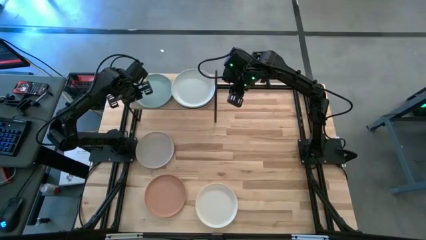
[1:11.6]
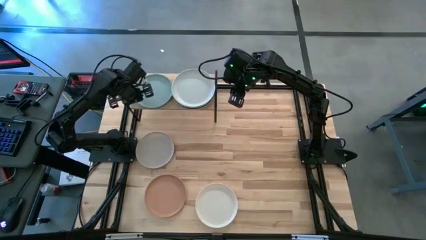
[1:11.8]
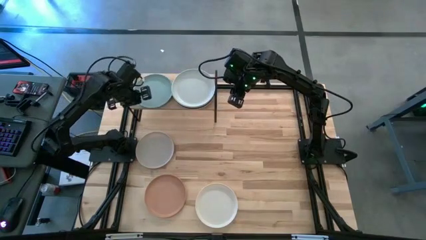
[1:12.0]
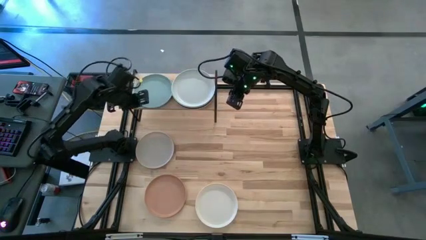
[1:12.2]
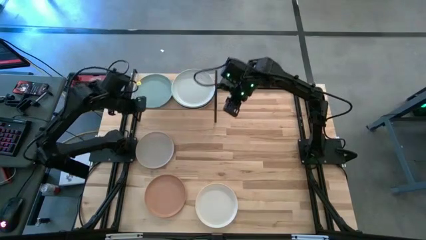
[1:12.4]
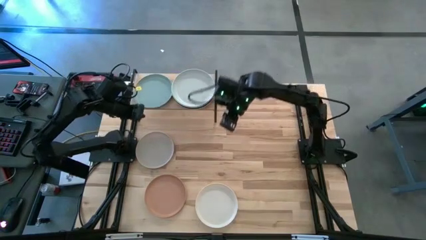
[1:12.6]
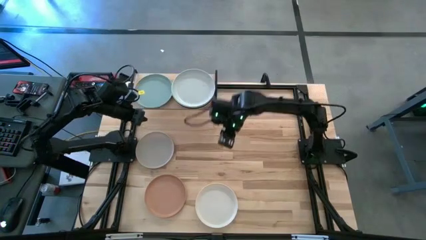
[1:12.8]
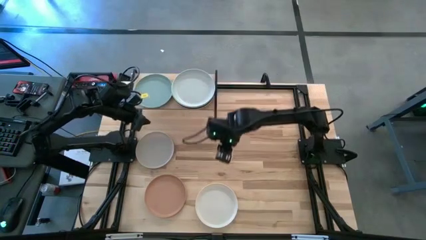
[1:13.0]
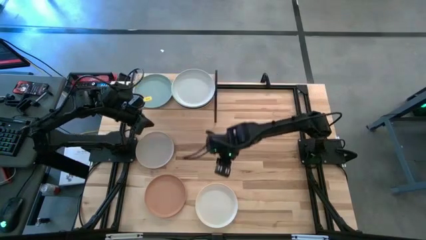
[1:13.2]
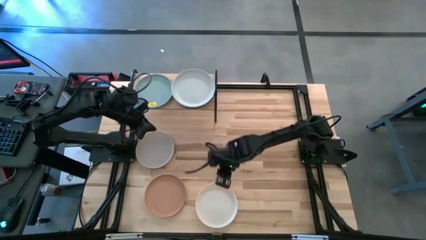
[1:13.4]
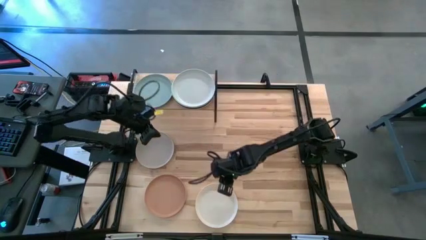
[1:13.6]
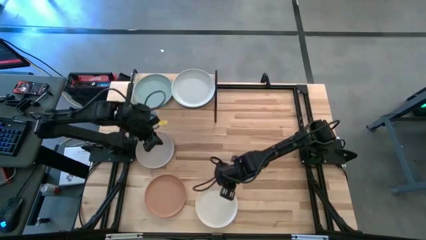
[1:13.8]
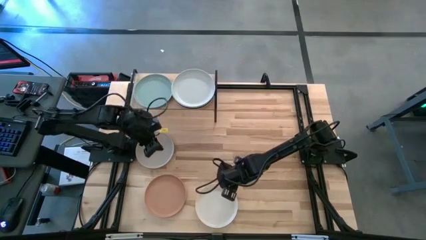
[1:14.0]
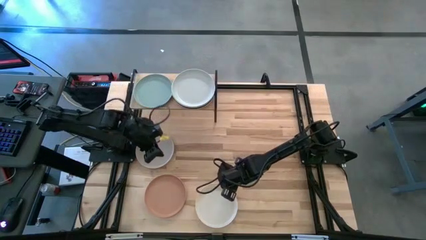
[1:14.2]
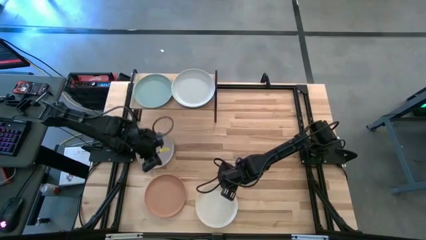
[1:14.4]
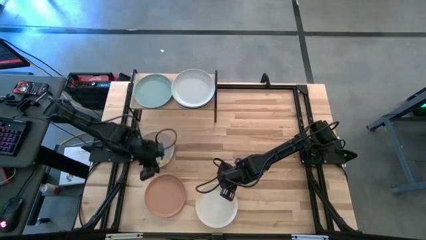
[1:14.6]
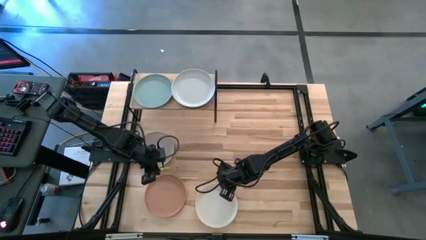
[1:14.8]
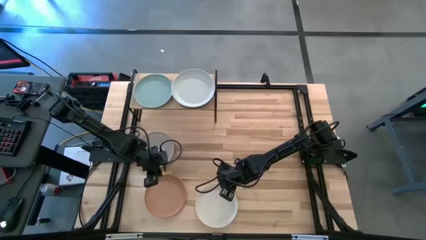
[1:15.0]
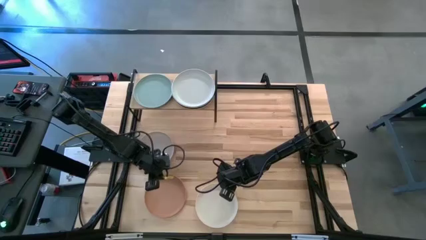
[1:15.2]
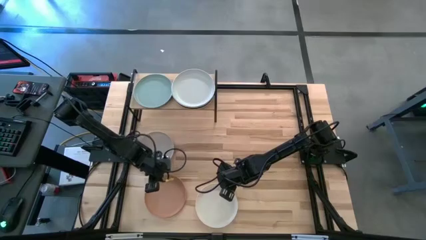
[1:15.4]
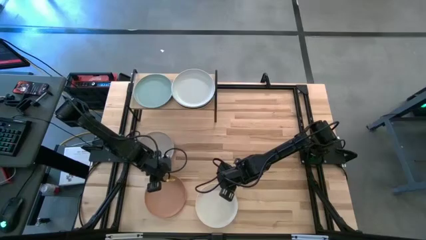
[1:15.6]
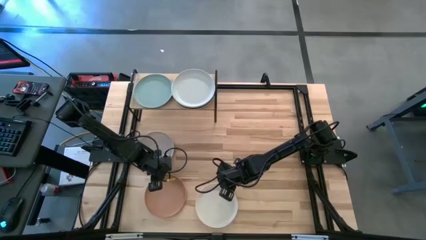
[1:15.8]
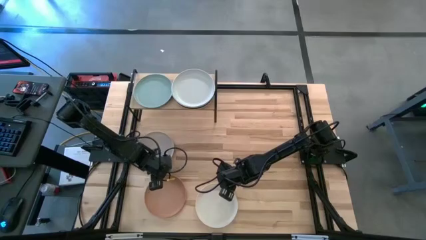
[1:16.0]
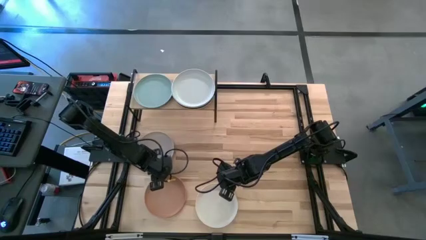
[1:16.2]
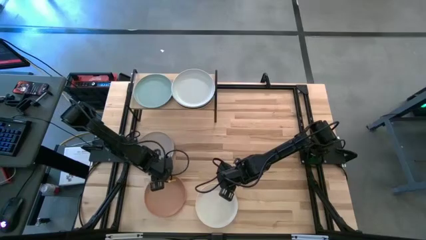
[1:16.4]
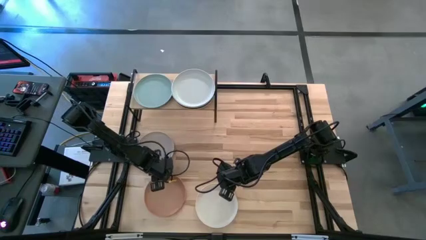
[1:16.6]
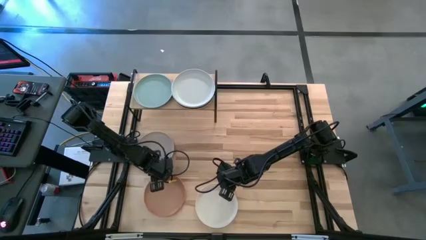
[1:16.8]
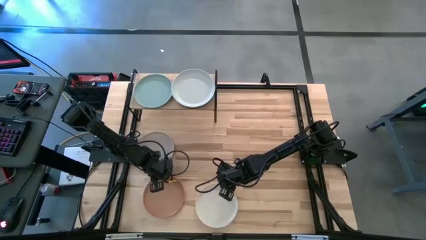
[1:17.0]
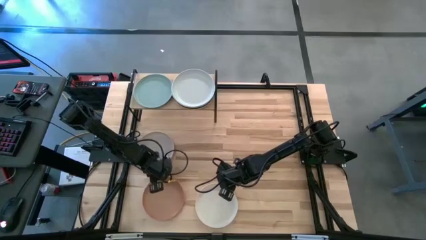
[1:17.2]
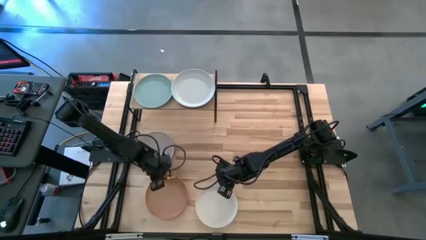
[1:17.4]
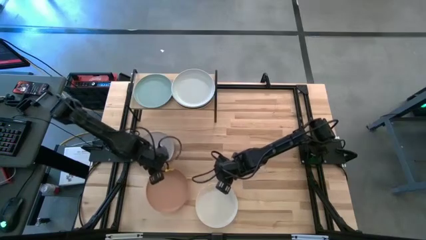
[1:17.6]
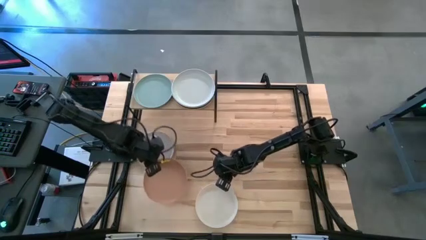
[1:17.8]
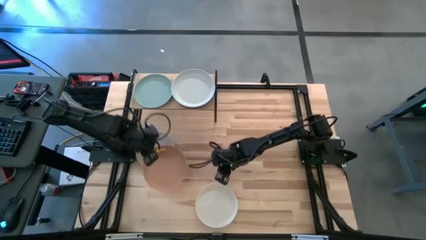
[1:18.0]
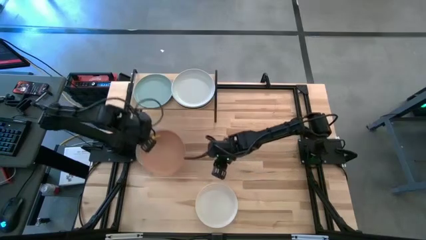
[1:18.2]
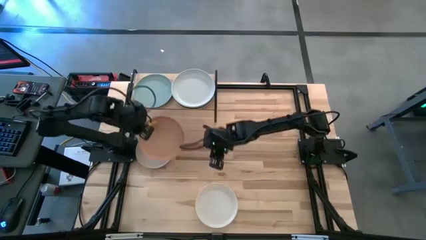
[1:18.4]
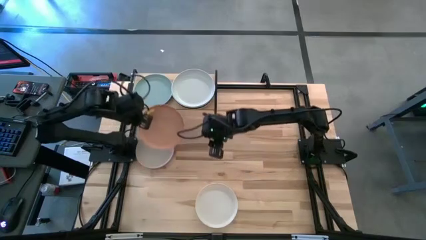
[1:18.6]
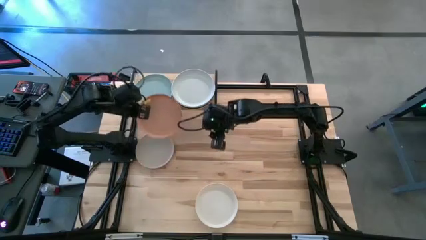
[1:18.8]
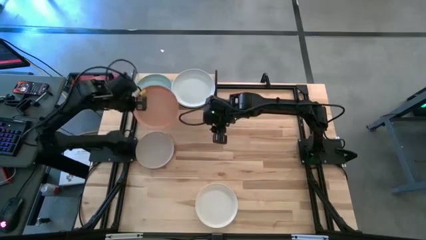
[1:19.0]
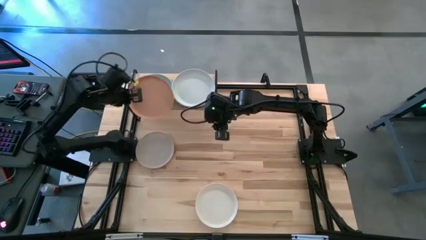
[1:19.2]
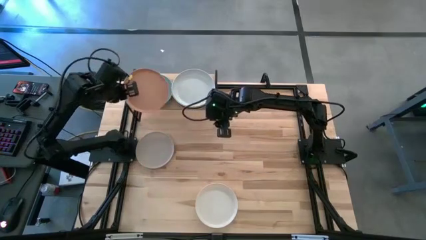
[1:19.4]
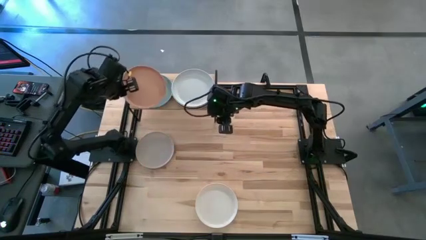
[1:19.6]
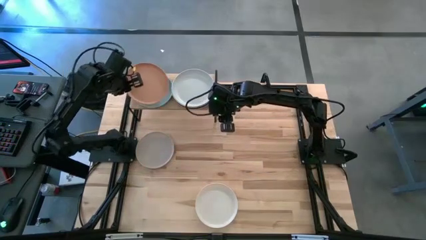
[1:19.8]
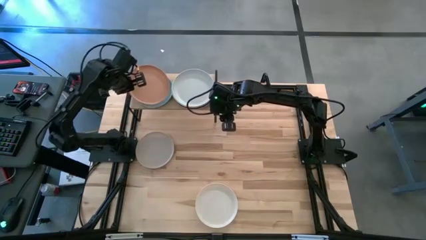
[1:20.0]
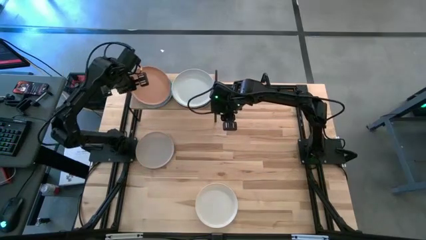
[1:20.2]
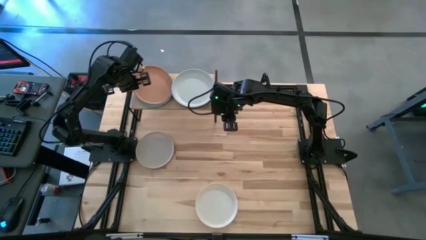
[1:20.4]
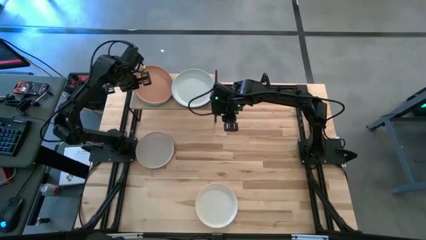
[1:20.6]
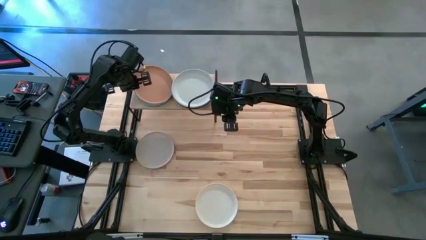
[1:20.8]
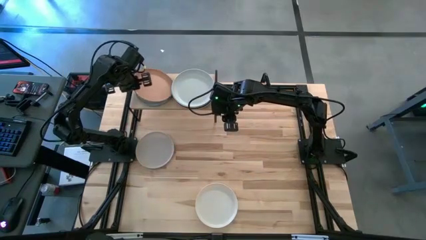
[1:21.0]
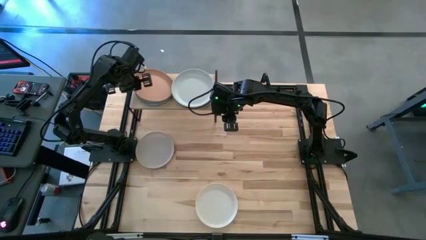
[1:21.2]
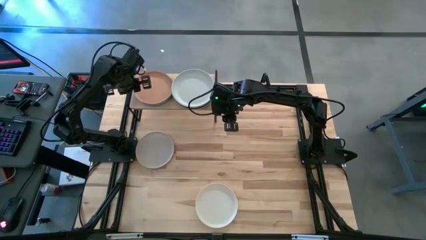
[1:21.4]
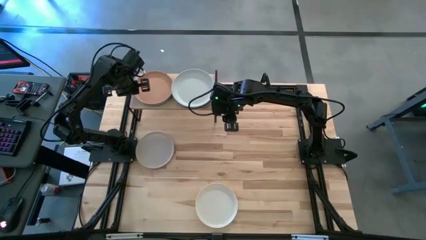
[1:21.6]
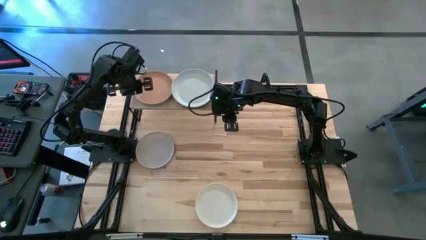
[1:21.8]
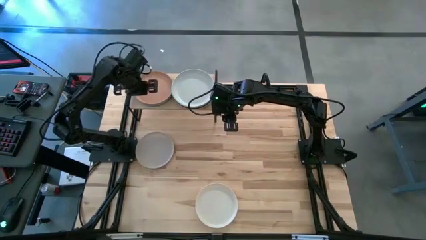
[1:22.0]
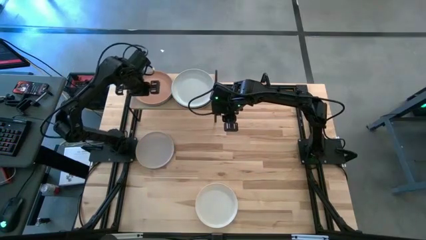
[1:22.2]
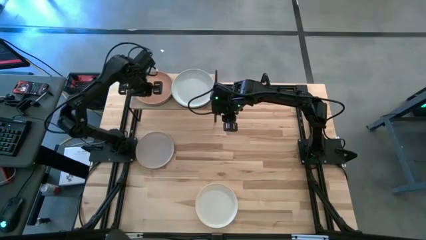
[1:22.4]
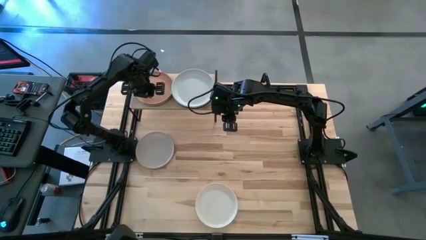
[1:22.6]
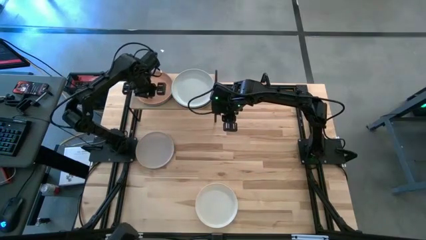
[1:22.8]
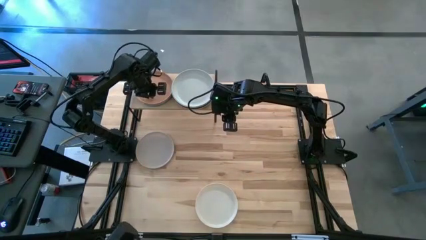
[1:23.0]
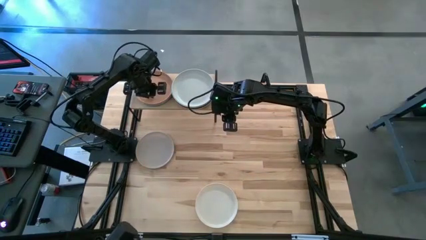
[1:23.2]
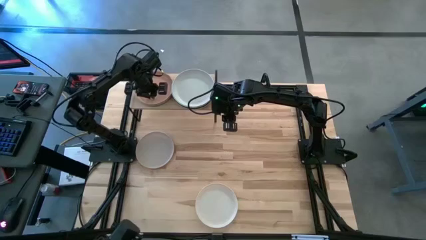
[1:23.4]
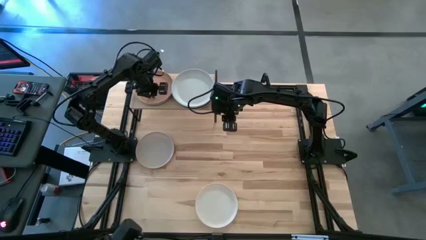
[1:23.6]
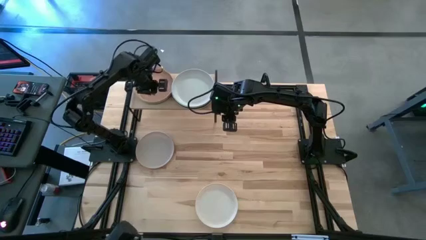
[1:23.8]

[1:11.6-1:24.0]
Task: Place and stack plates onto a shelf
Stack the orange plate into the blue plate on the shelf
